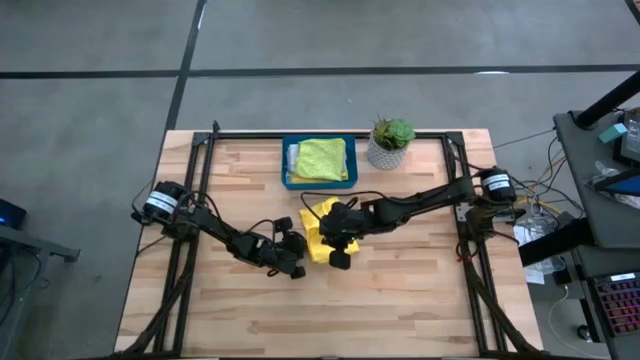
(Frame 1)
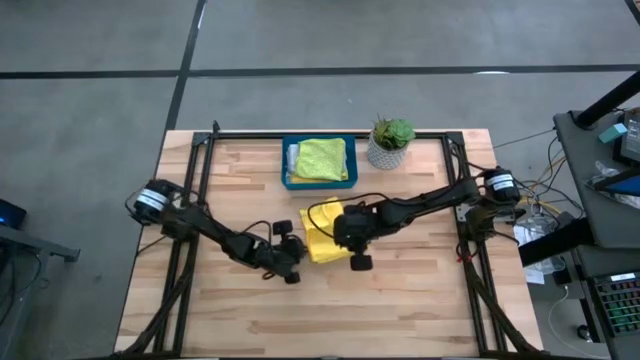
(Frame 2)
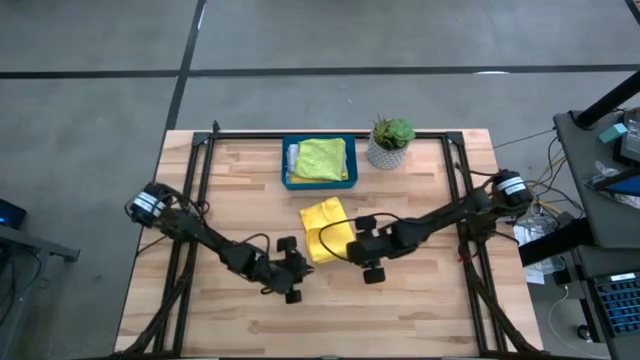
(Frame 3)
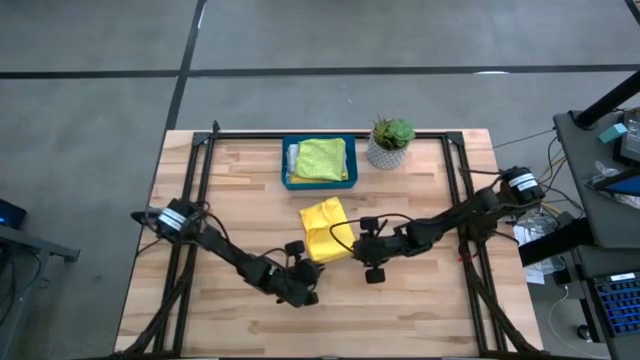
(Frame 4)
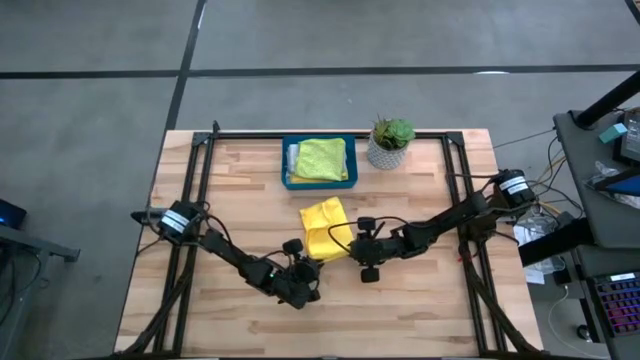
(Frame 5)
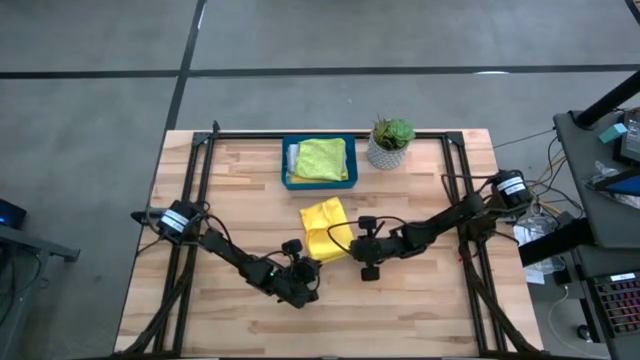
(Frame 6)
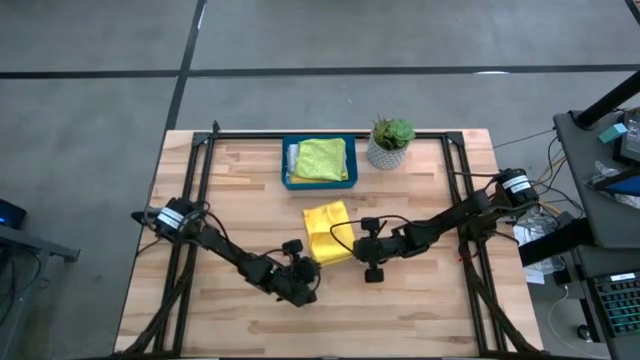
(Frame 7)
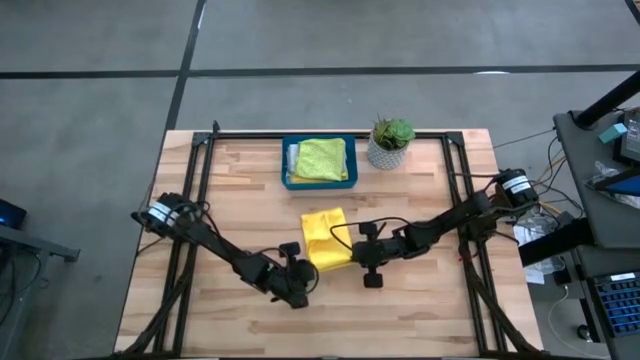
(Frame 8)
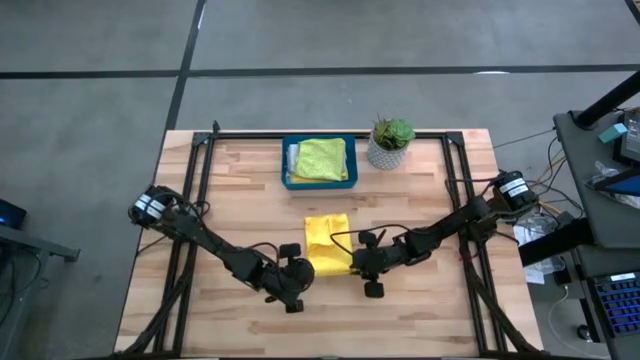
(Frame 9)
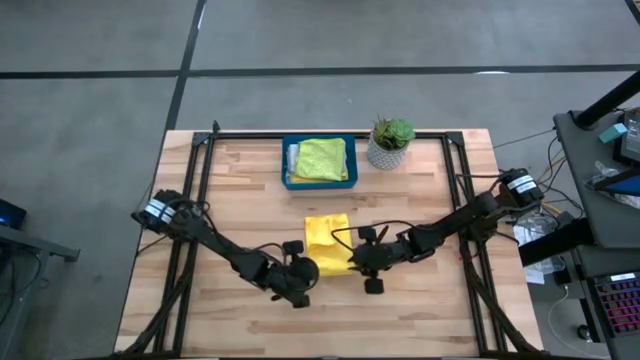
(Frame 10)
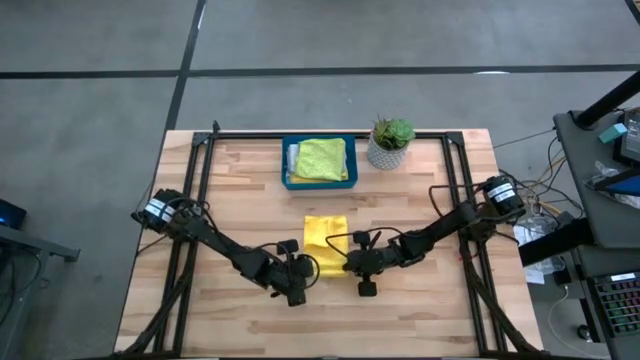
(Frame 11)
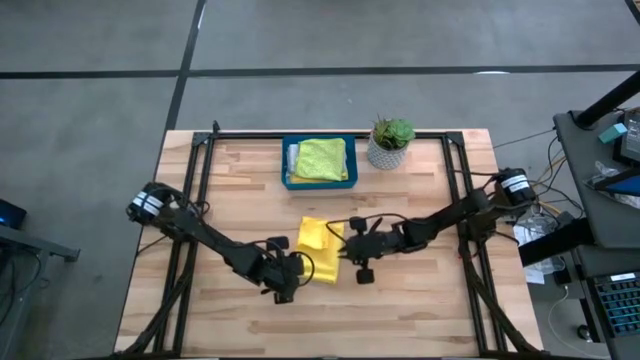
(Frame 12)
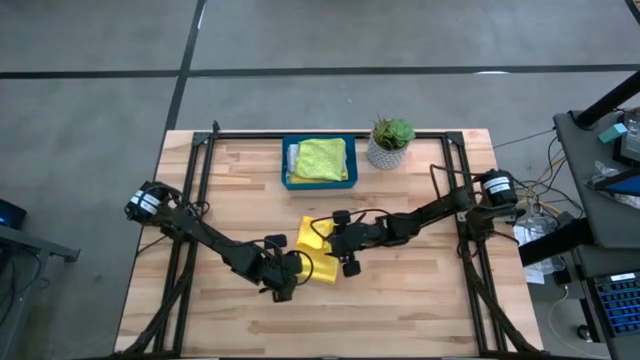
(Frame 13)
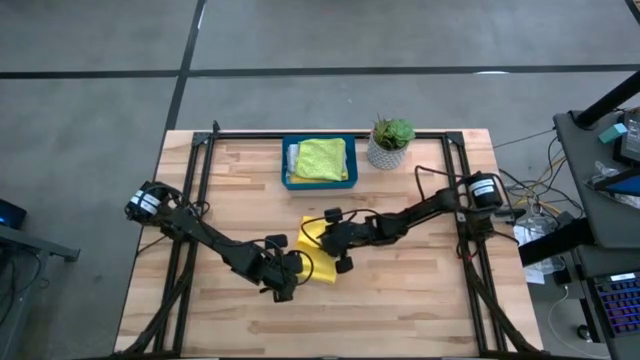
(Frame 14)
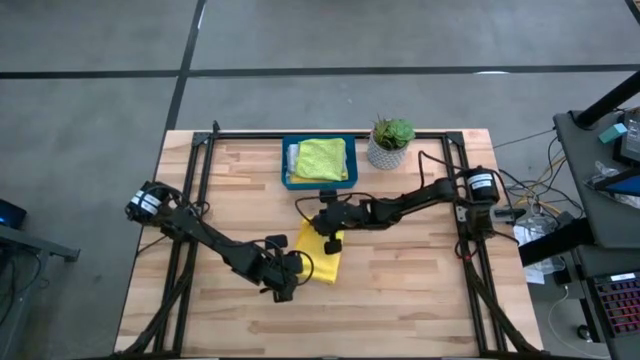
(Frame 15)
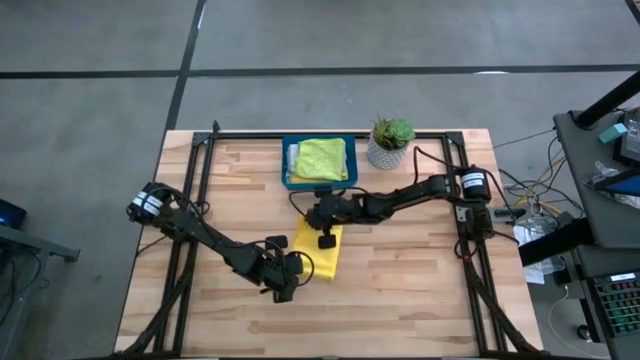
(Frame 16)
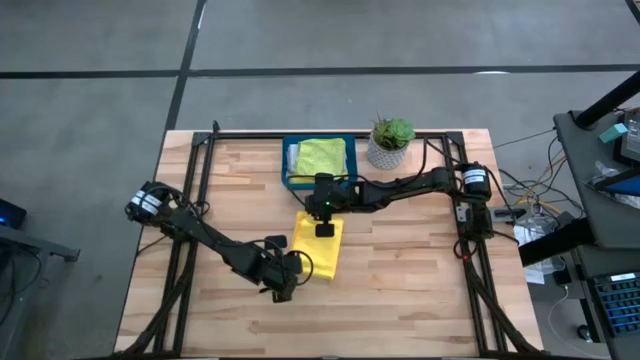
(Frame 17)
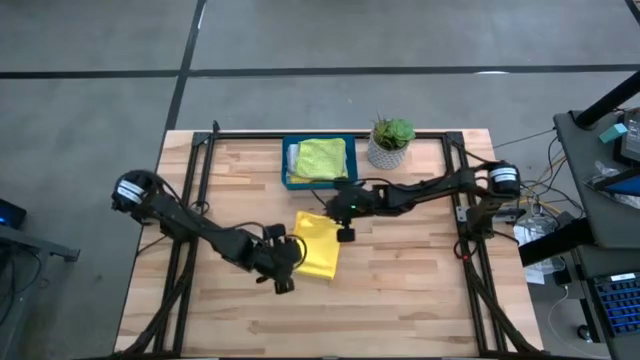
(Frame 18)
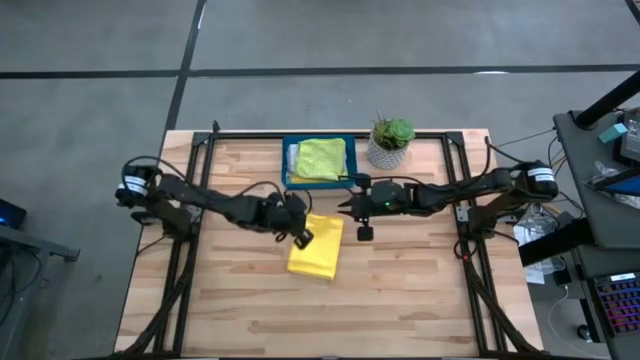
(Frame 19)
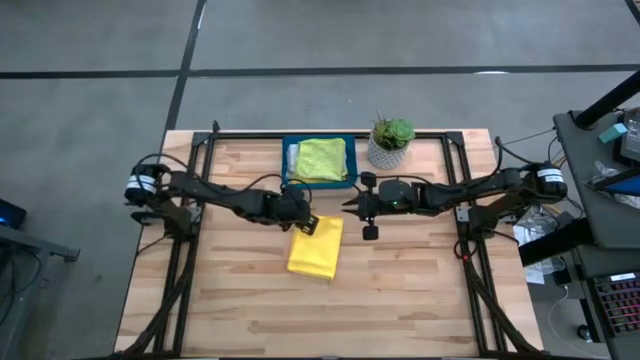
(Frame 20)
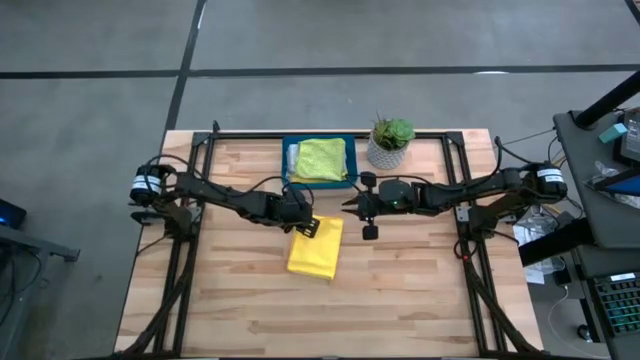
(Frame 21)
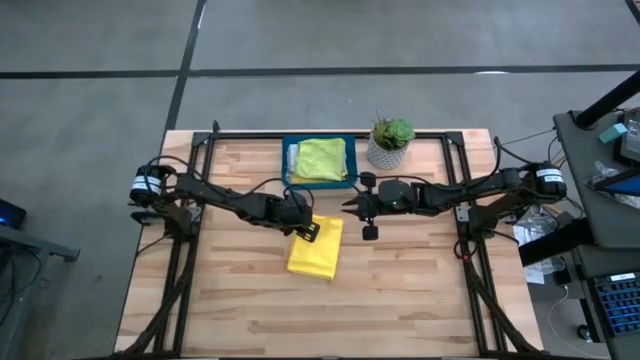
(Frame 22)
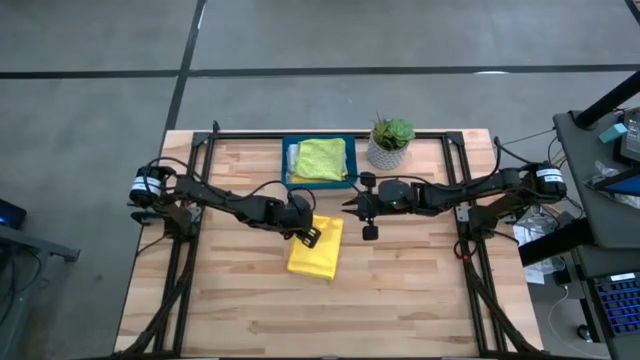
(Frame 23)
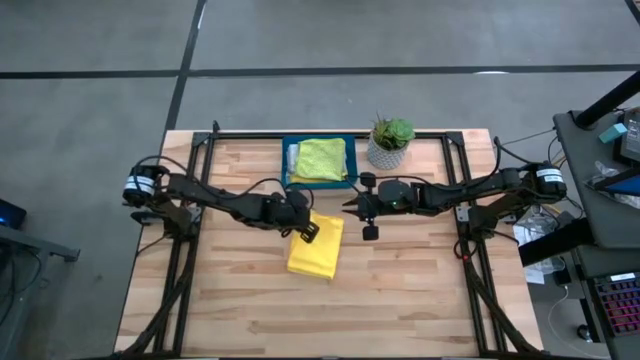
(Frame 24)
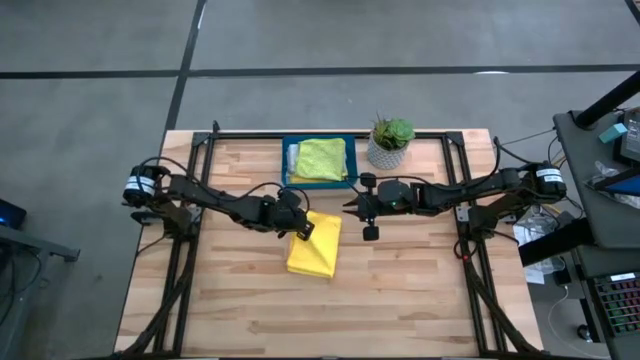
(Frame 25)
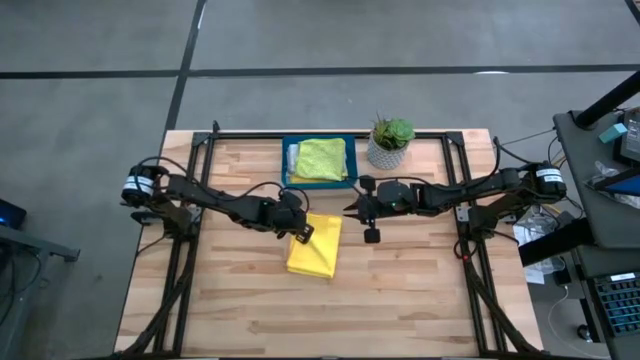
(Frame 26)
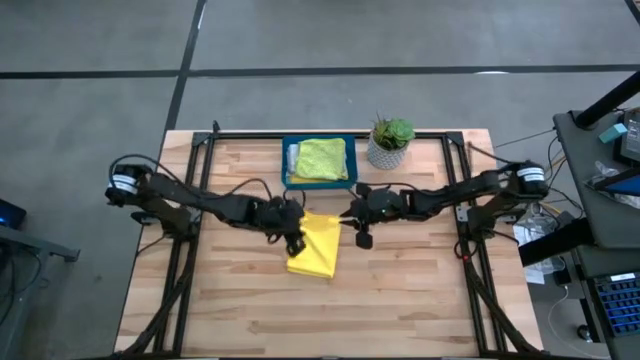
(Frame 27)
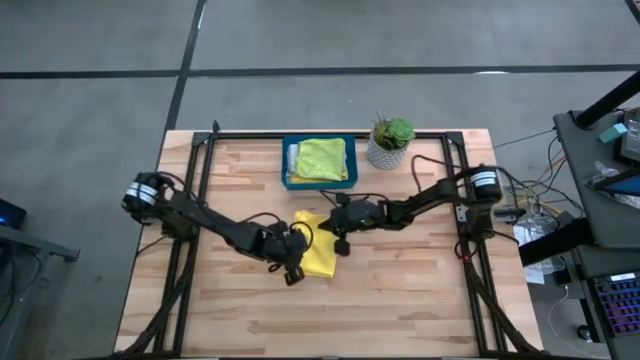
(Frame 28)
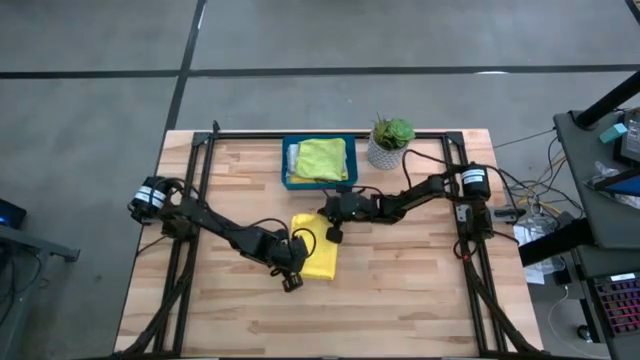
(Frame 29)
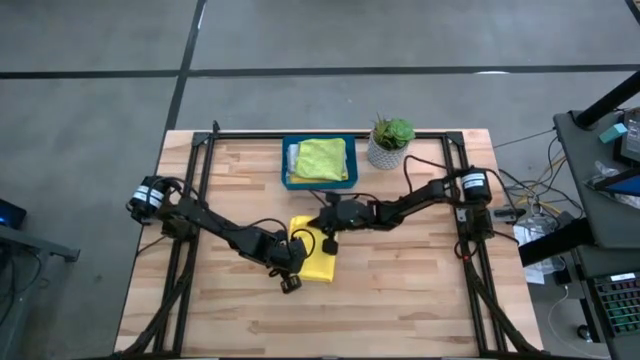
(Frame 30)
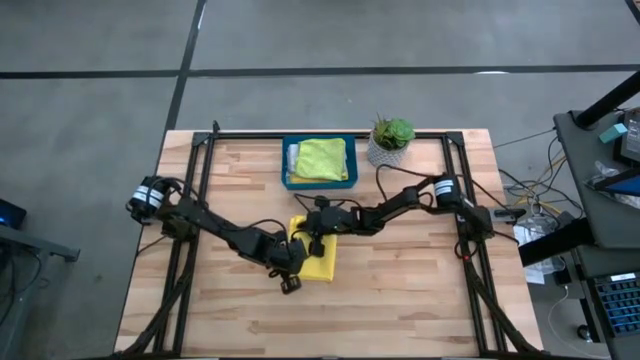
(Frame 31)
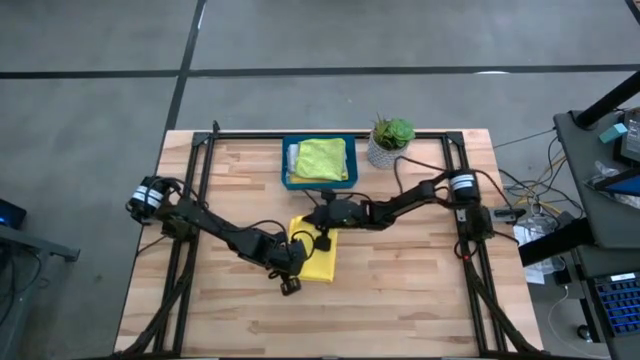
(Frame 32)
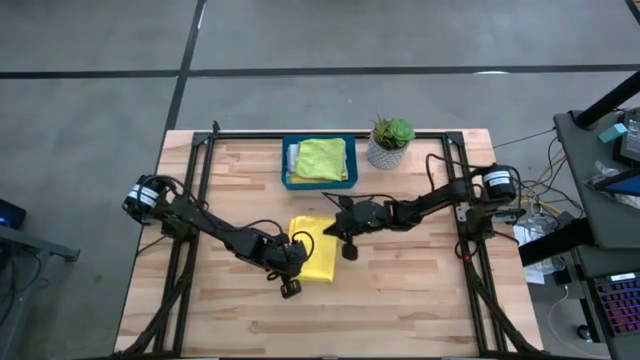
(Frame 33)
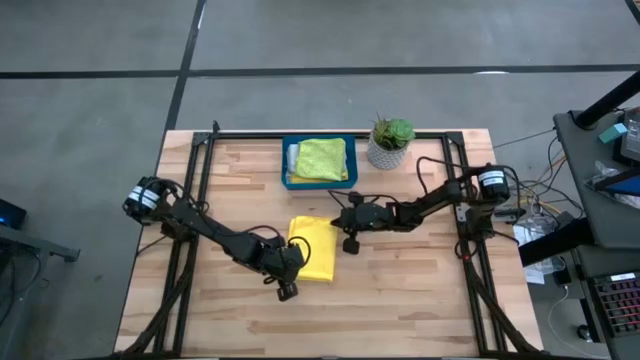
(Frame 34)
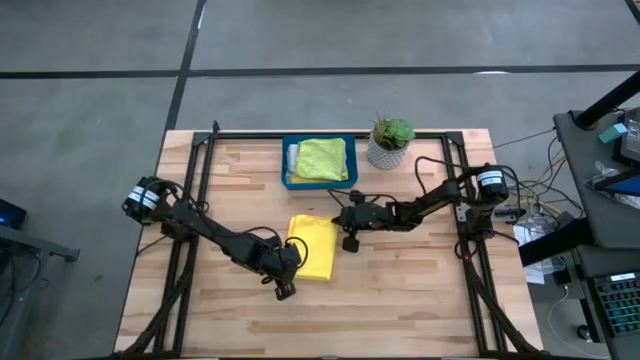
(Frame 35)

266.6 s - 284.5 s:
Task: Fold microfiber towels
Fold the yellow microfiber cloth

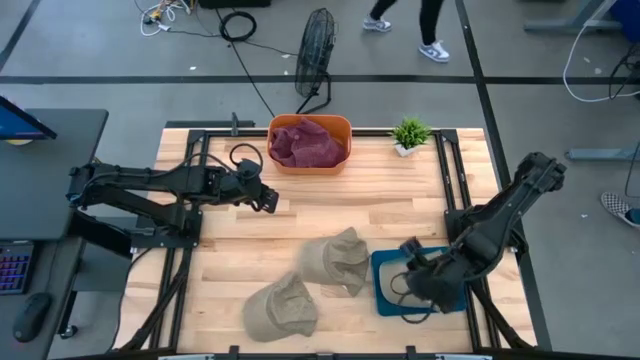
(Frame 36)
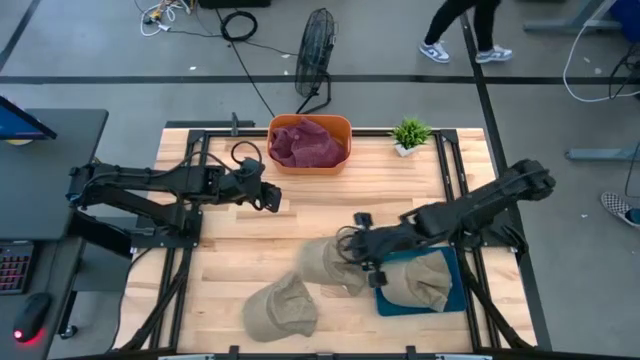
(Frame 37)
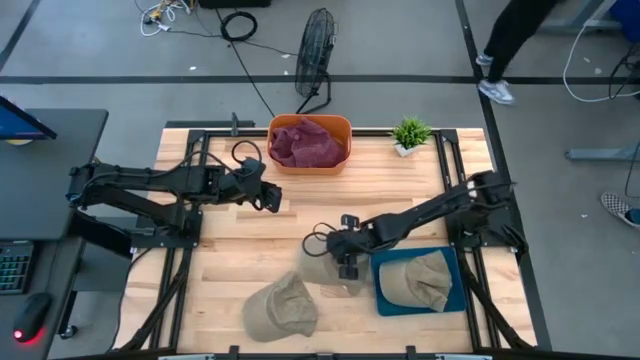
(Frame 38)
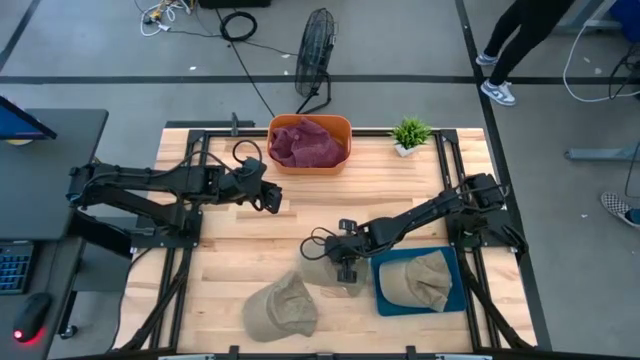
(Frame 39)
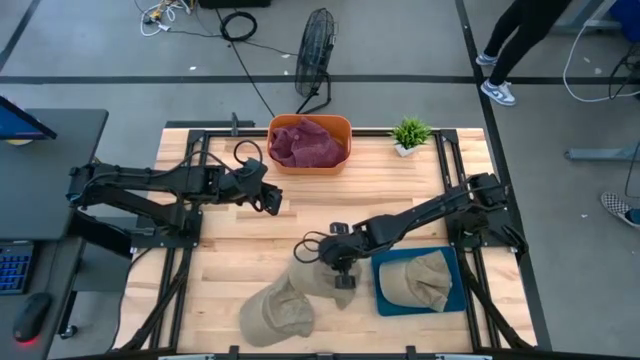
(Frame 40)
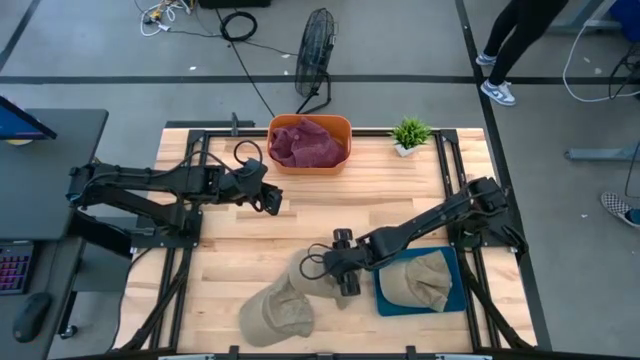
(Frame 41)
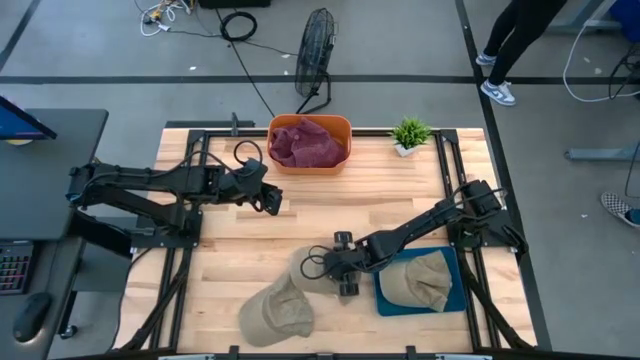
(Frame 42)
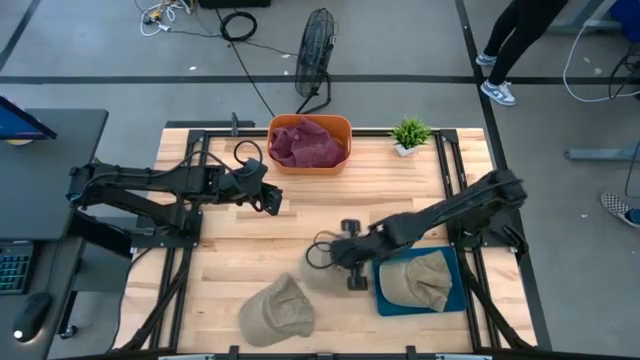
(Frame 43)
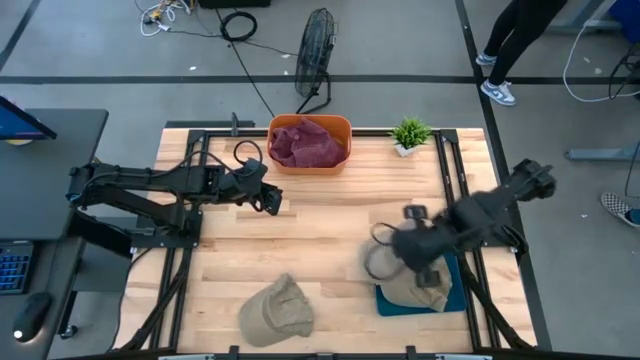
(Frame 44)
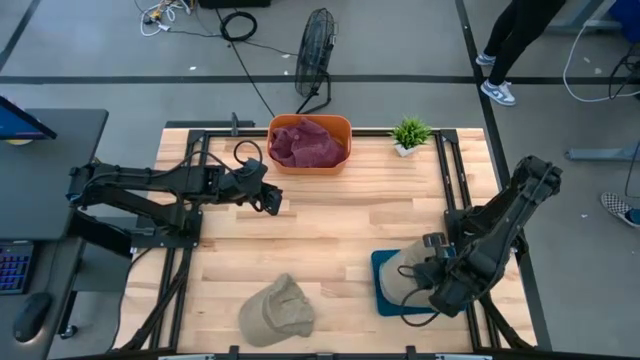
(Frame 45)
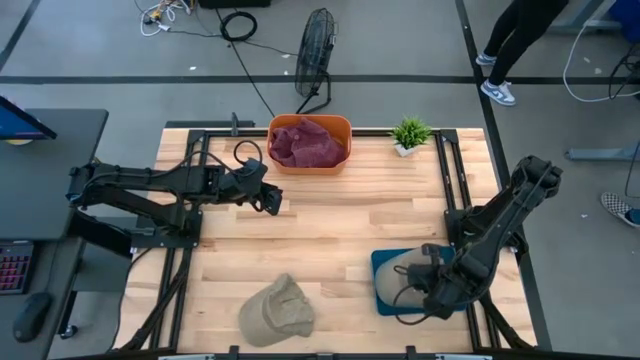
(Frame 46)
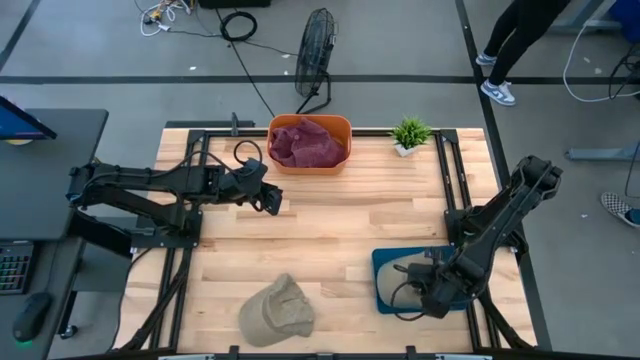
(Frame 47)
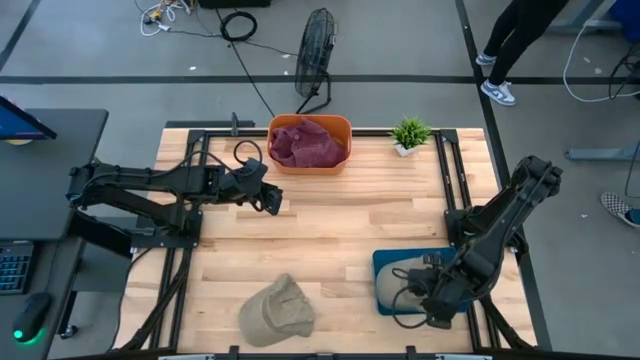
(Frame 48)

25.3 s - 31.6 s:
Task: Pick & Place hat
Put the top brown cap into the blue bin
